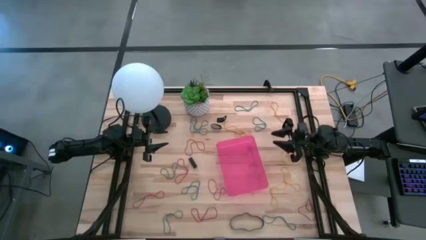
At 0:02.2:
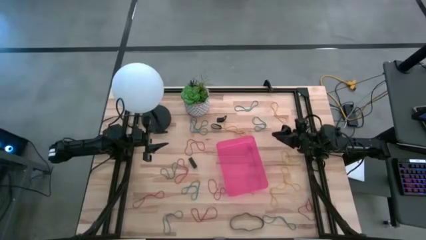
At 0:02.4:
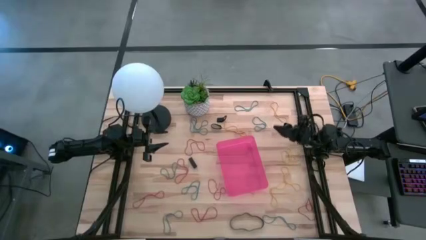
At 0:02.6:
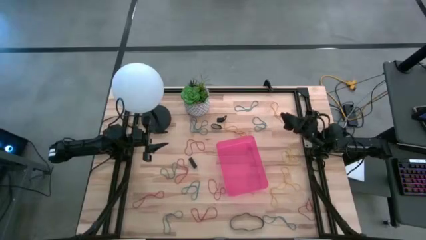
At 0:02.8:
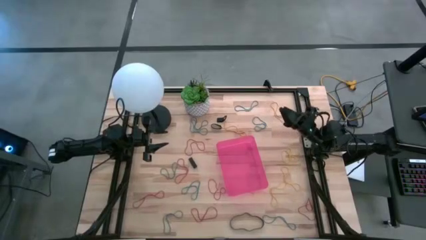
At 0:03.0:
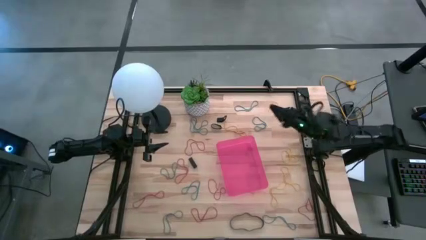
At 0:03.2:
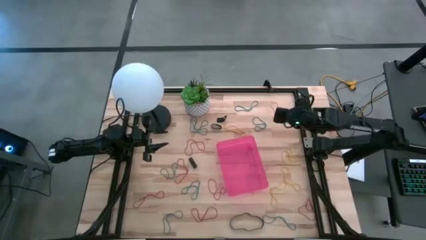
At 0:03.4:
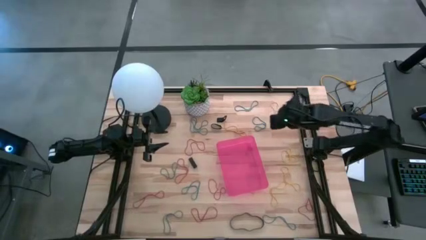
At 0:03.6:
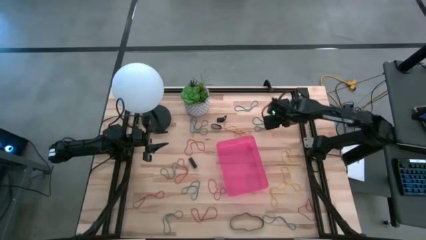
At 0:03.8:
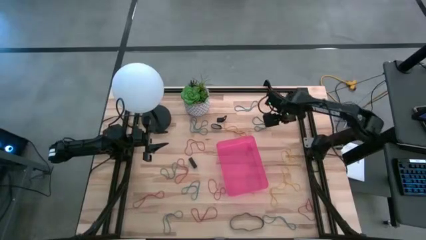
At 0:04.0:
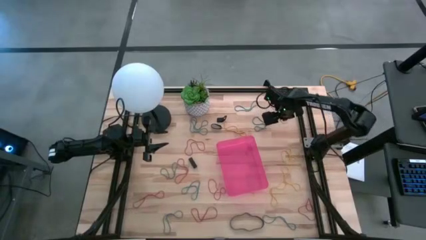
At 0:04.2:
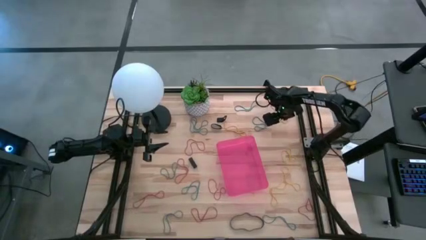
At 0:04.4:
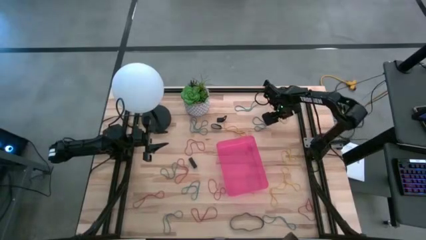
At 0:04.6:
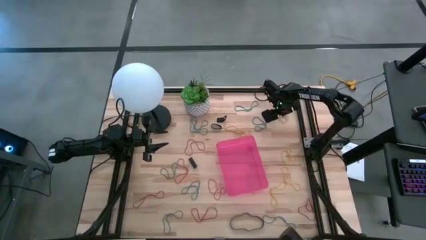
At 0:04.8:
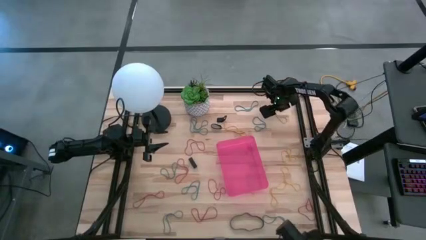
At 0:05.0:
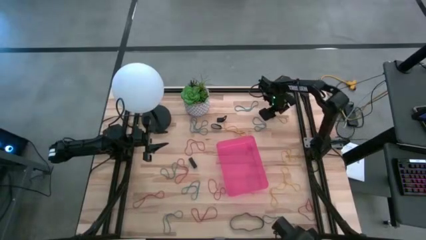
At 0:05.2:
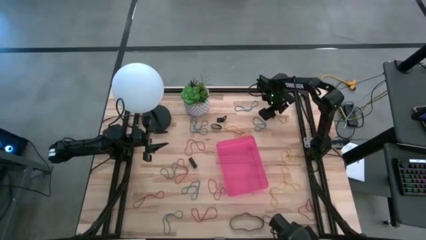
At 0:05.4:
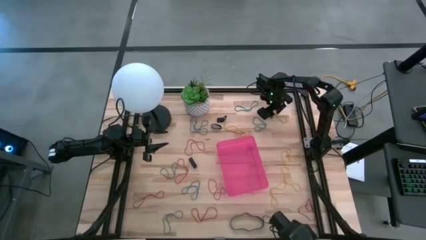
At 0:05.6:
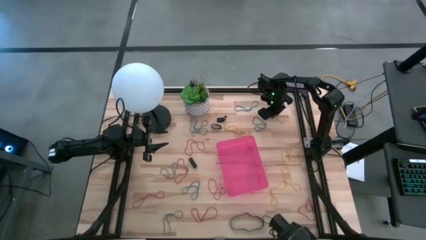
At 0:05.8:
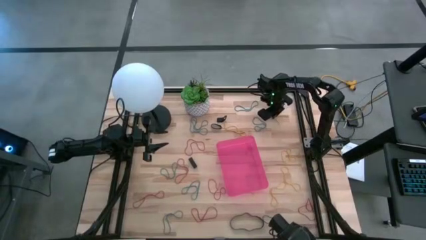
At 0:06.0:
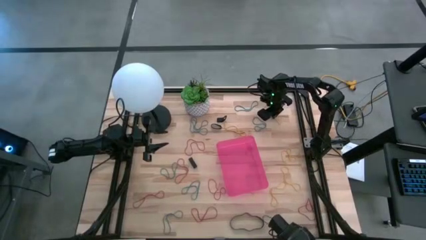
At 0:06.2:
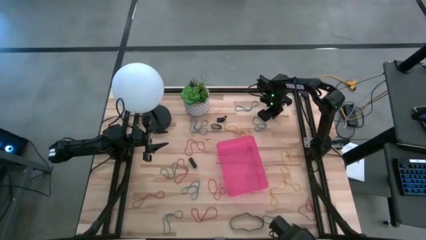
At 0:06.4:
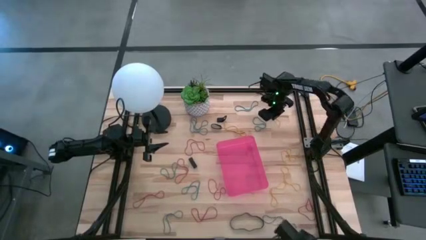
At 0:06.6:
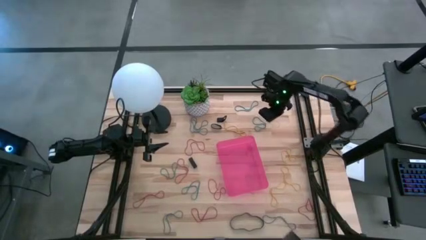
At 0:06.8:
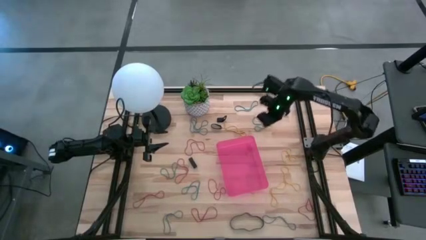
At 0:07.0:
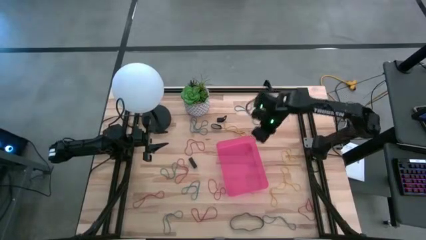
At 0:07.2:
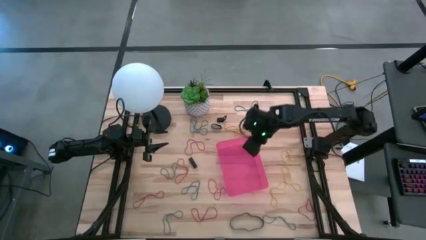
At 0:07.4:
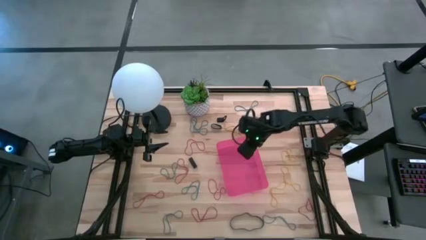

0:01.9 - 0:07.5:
Task: Pick and place rubber bands into bin
Put the yellow rubber band into the red bin

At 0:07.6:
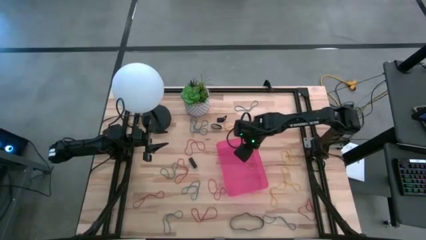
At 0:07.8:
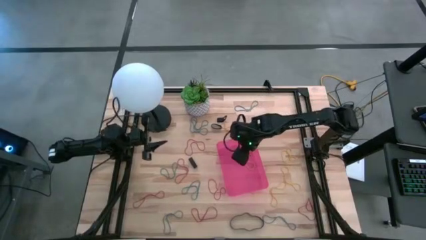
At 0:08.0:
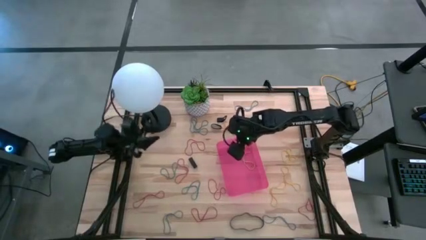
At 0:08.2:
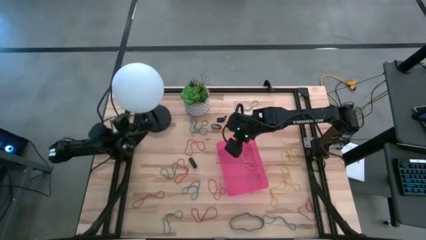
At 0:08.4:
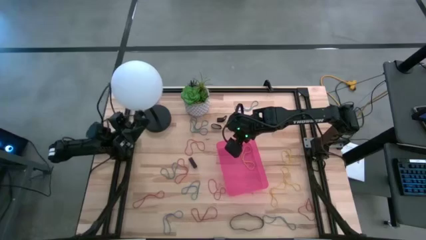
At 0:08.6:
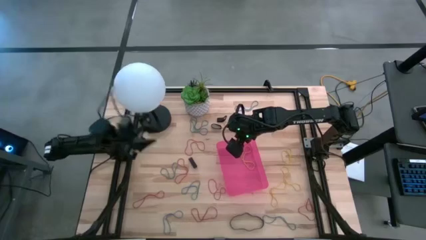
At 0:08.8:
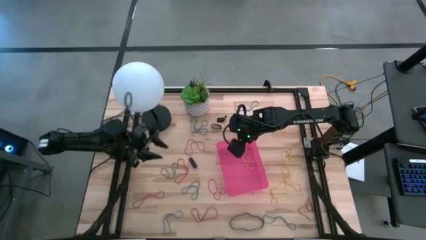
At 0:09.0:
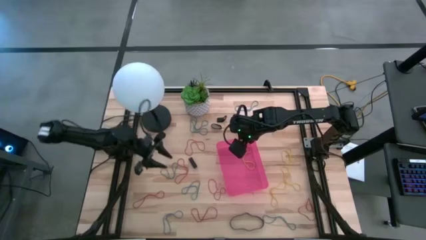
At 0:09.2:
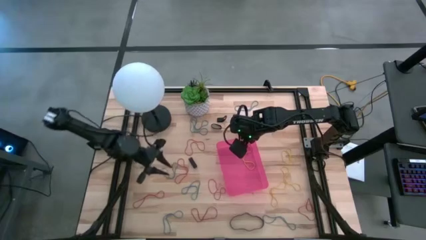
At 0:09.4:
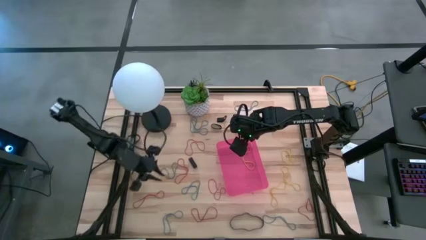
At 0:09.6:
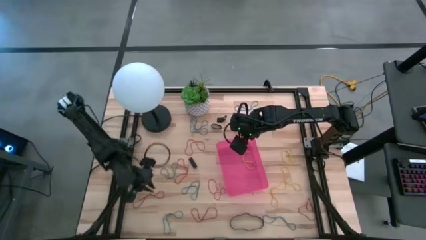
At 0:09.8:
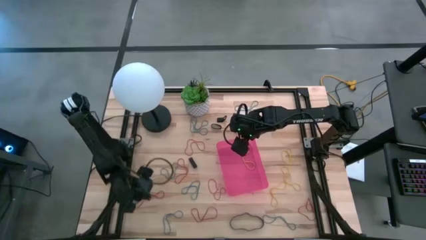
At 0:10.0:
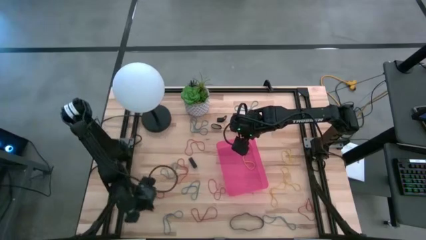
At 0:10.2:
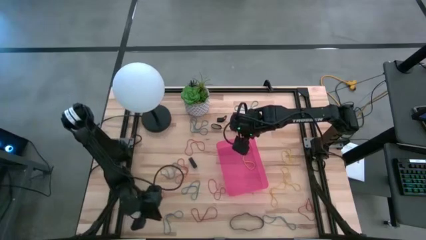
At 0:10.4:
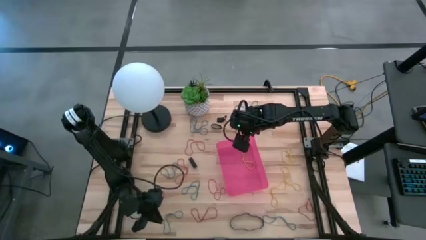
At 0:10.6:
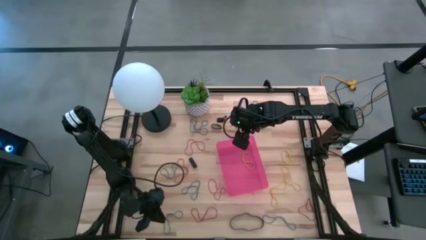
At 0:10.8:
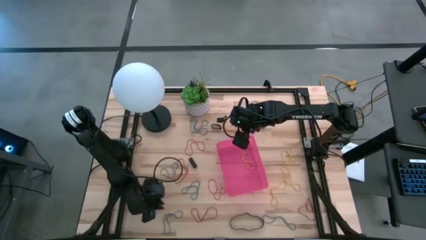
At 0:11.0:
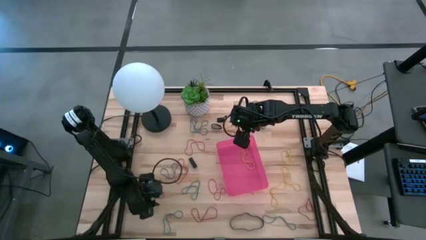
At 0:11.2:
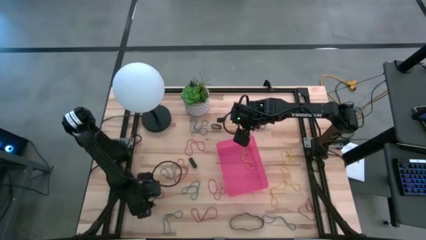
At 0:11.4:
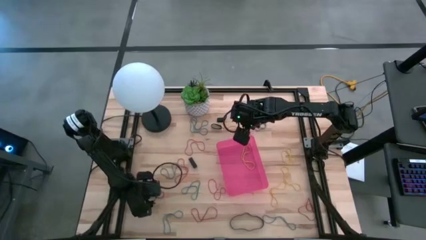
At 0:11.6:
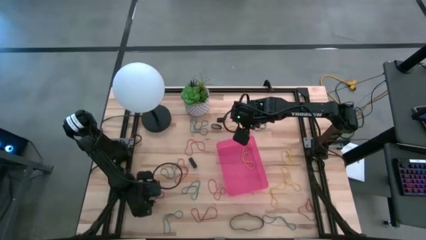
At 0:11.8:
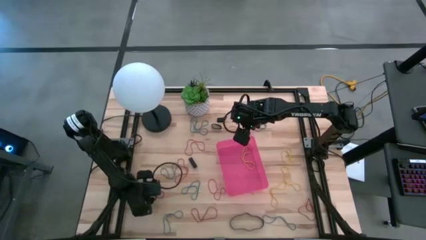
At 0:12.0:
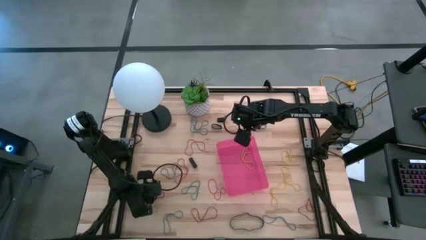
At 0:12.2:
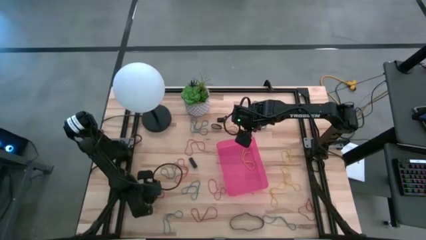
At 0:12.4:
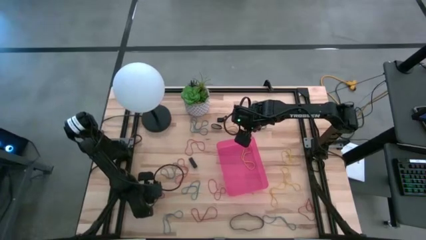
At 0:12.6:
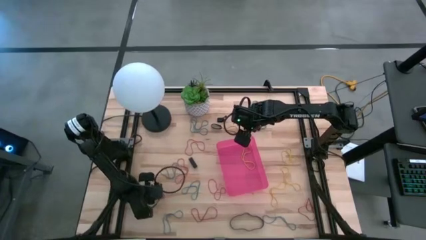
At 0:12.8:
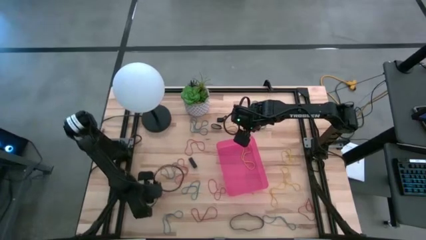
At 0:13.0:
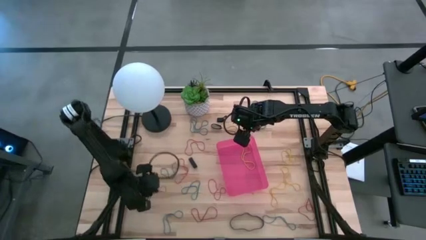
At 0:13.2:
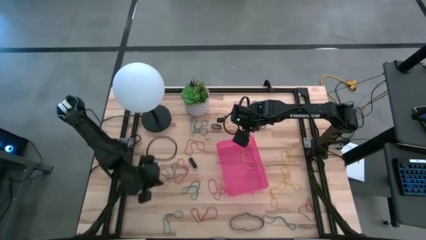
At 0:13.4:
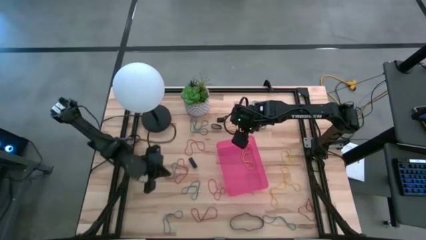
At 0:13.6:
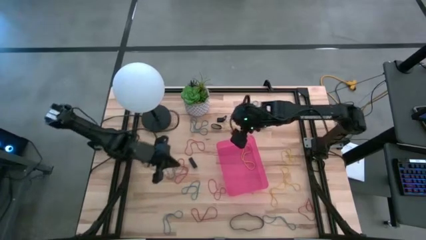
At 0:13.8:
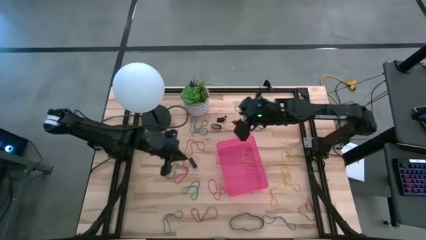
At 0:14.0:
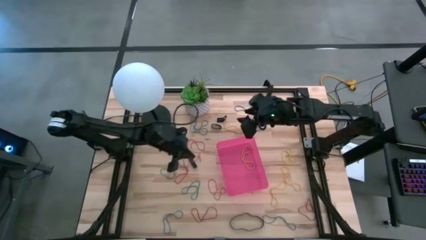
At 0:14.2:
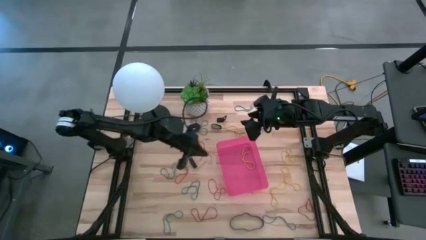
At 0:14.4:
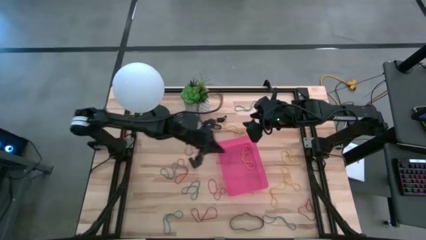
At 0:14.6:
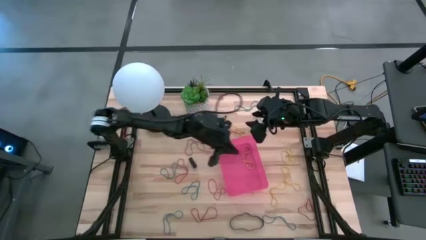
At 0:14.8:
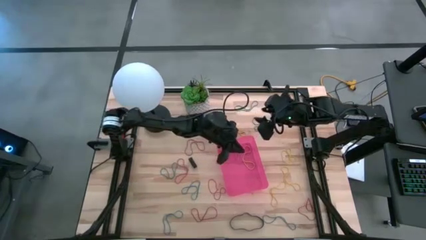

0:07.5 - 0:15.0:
Put the red rubber band into the red bin

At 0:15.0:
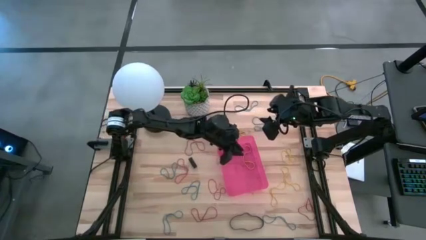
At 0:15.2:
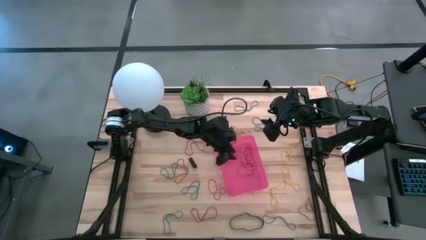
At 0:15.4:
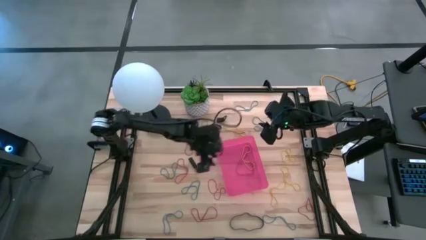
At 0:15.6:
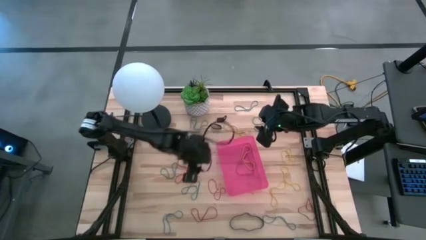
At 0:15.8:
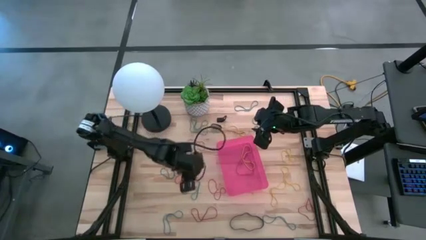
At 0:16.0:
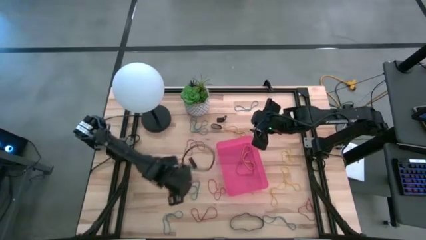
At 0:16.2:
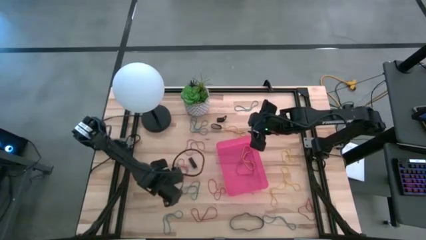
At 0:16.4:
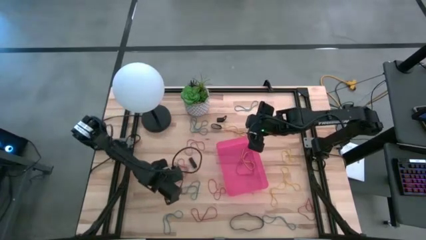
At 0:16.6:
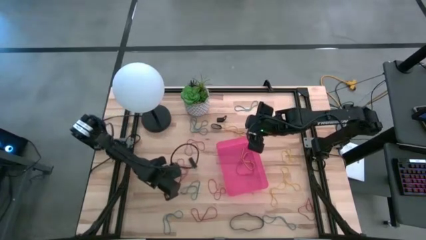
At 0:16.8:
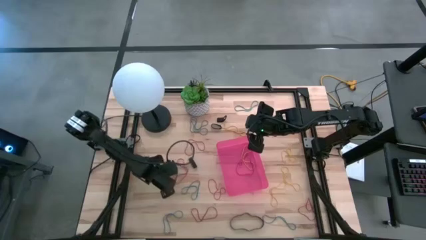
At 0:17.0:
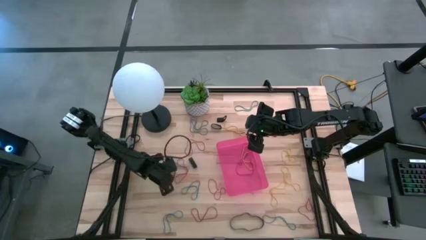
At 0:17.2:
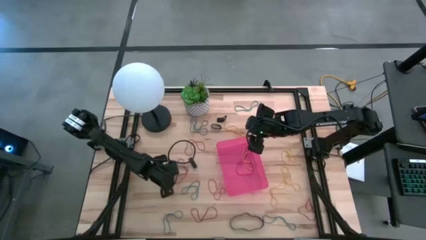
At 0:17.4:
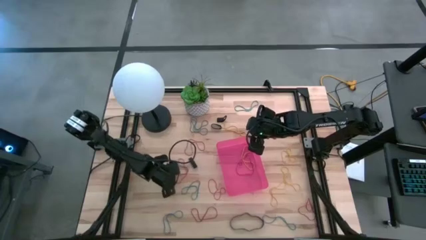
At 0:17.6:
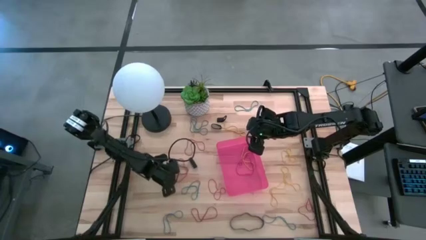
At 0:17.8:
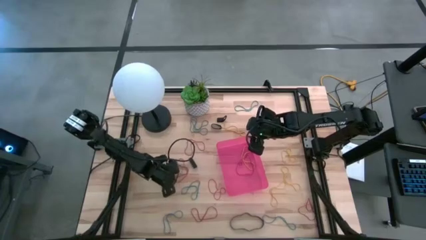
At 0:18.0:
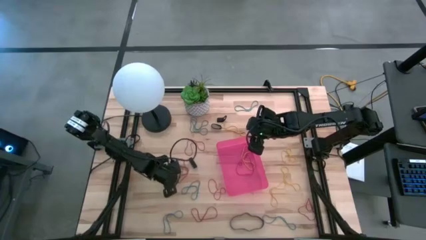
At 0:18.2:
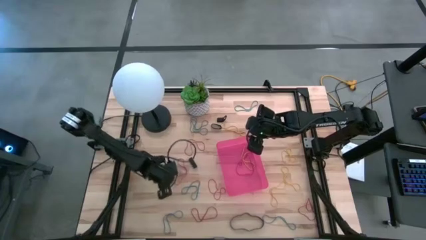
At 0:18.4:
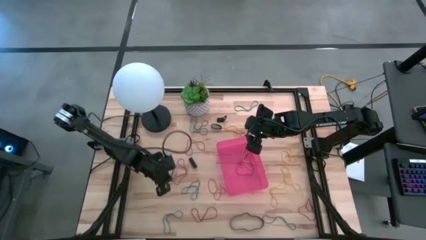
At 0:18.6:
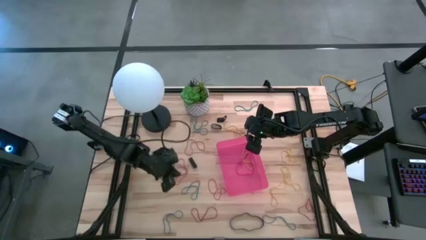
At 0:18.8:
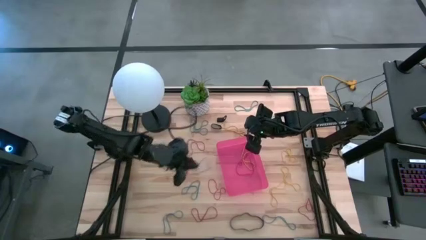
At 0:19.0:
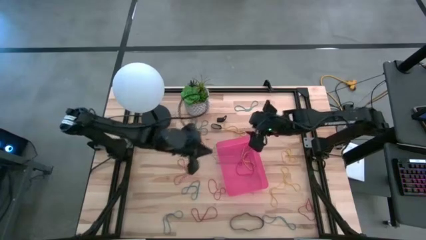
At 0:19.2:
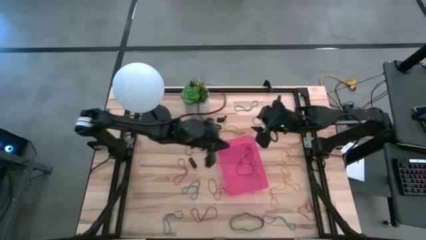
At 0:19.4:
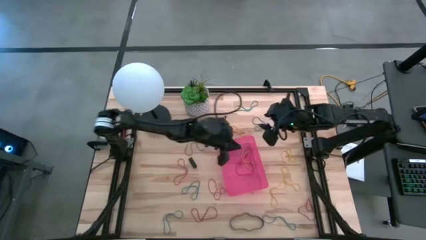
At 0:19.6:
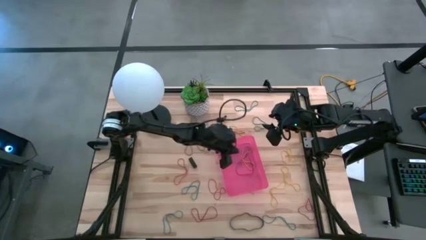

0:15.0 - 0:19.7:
Put the blue rubber band into the red bin
